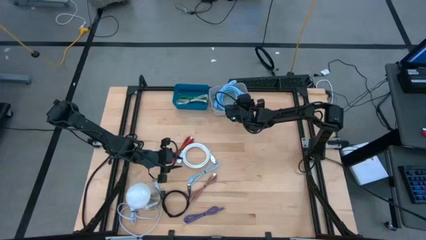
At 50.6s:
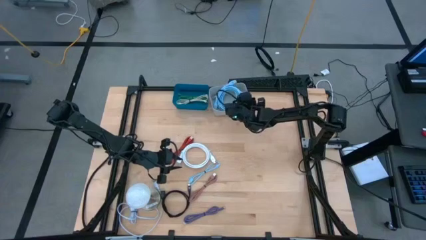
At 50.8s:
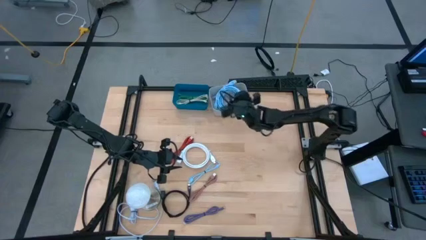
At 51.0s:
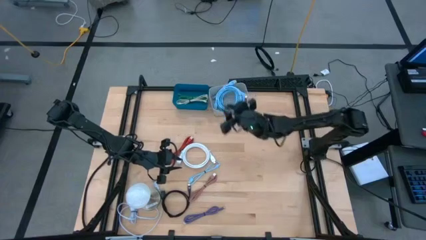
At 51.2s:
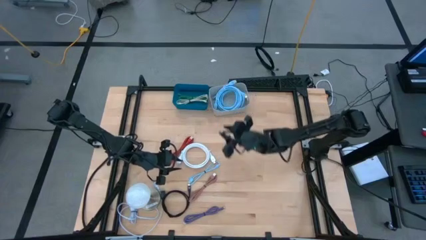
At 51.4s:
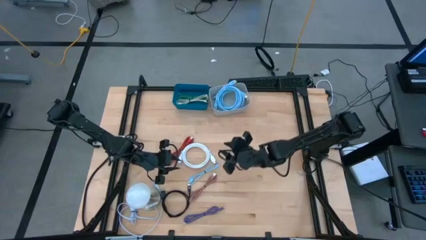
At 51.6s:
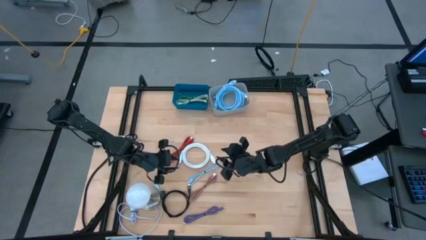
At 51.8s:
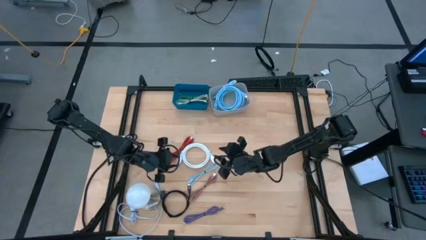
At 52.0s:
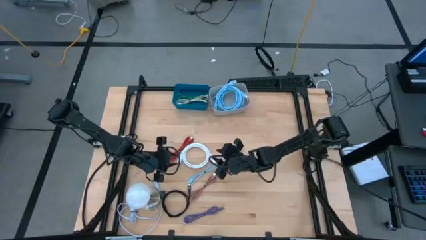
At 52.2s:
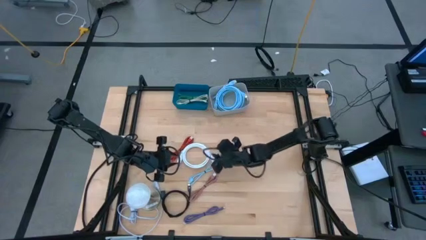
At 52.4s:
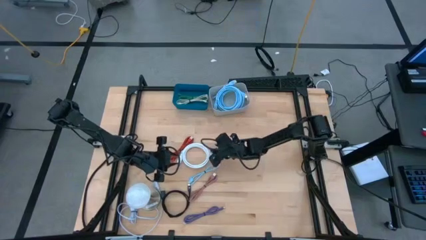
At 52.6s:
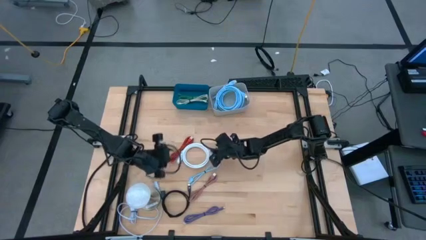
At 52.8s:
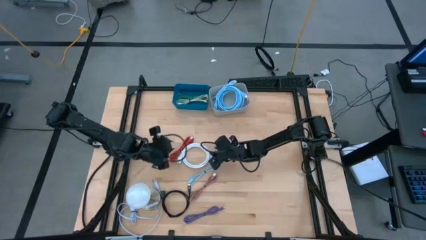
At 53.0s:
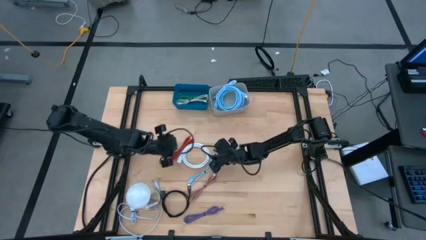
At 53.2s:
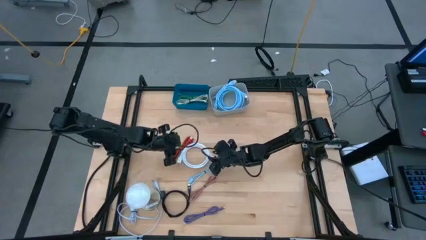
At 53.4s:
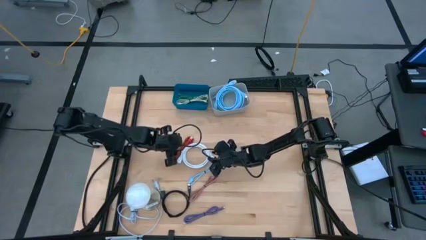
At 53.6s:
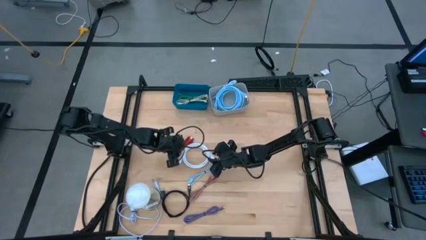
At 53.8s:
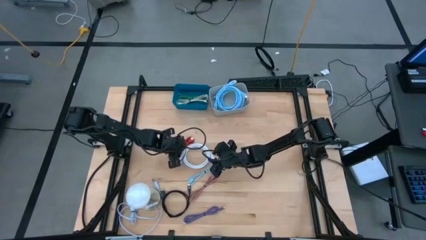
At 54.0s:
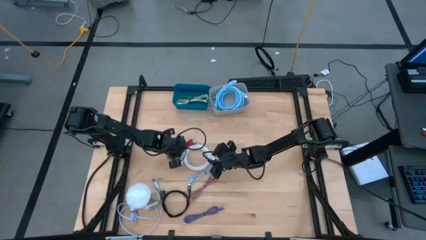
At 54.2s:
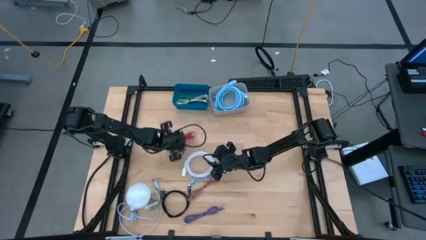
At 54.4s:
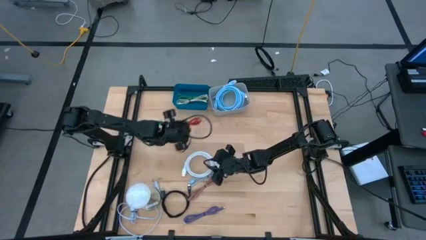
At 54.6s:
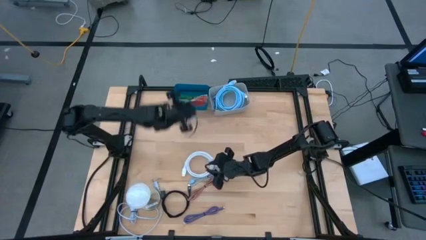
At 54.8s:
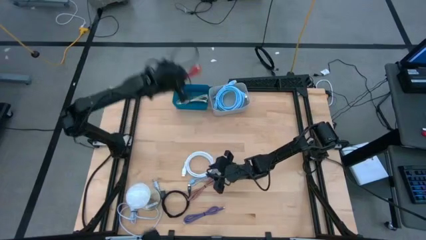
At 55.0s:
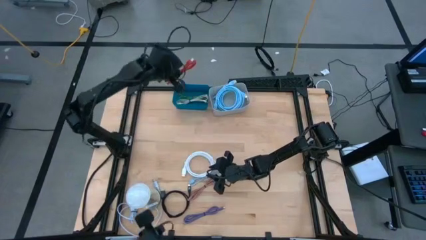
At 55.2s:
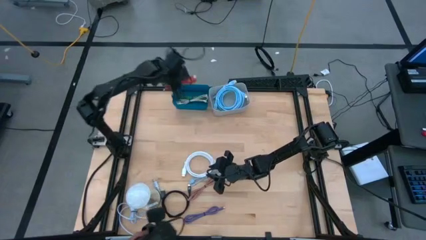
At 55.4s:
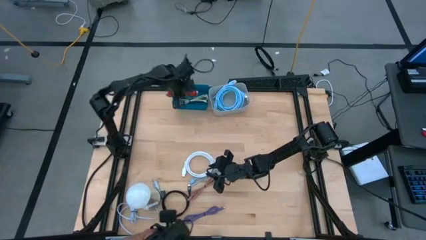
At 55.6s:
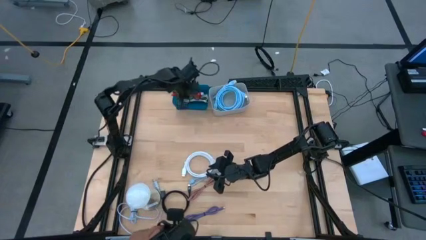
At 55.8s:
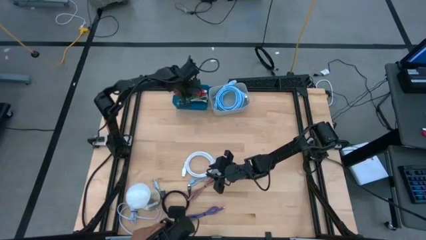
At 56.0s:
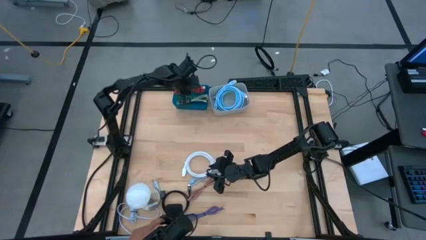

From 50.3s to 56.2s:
Task: Pick & Place USB Port
Put the red usb cable into the blue bin

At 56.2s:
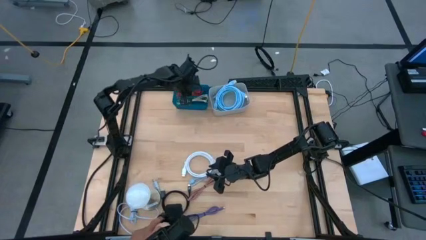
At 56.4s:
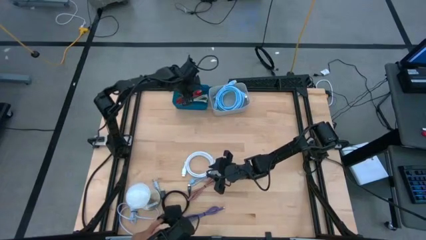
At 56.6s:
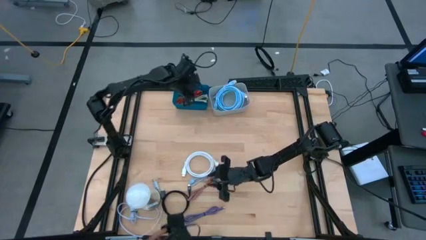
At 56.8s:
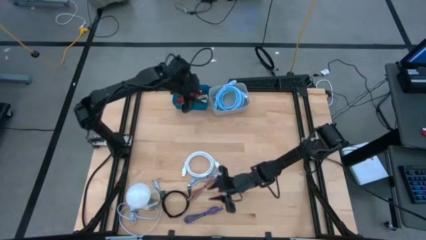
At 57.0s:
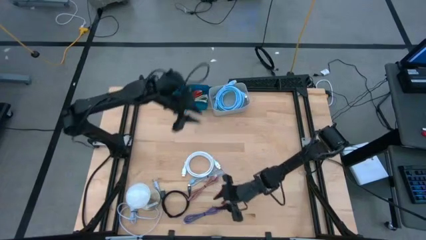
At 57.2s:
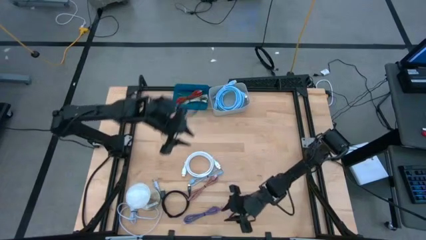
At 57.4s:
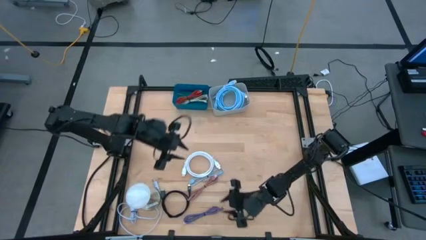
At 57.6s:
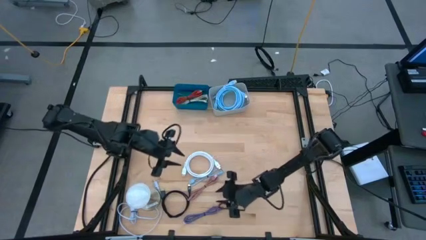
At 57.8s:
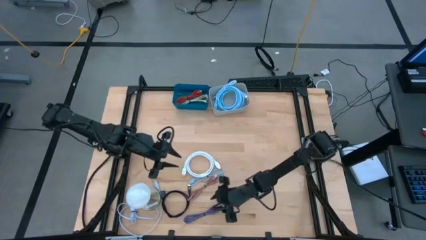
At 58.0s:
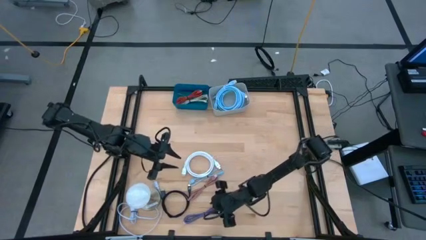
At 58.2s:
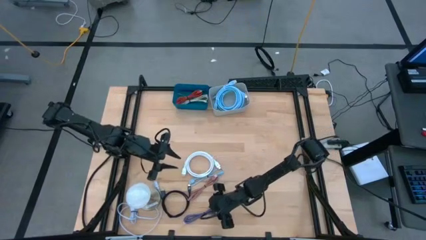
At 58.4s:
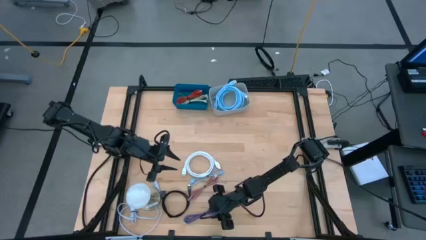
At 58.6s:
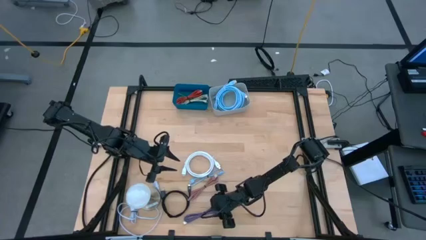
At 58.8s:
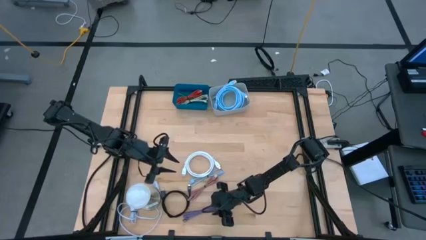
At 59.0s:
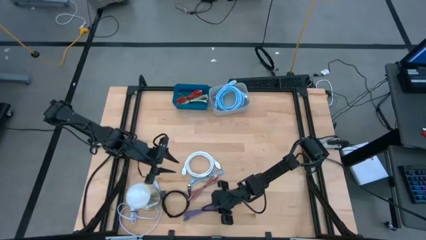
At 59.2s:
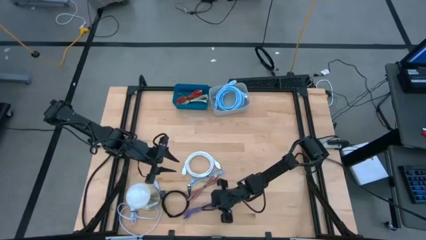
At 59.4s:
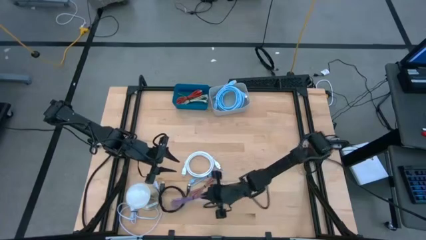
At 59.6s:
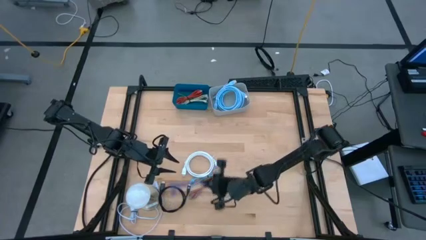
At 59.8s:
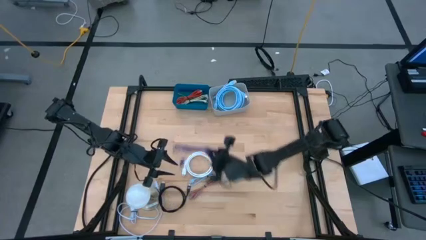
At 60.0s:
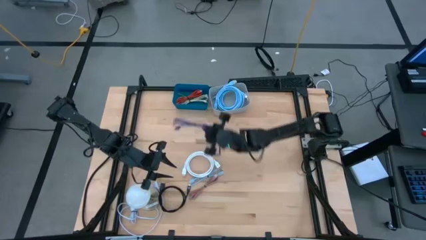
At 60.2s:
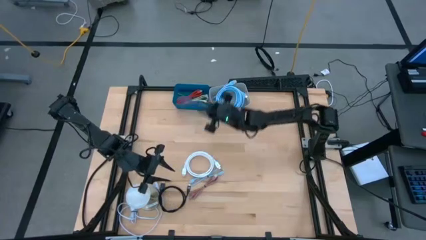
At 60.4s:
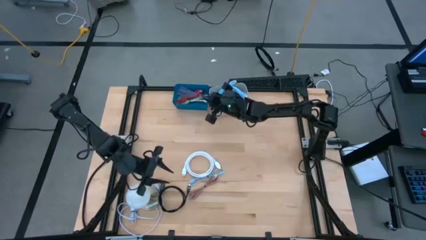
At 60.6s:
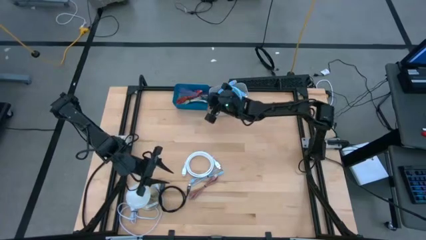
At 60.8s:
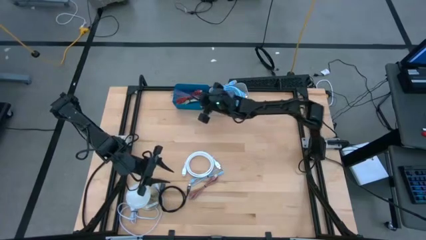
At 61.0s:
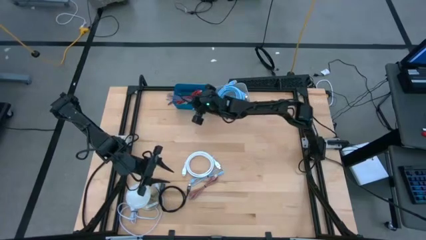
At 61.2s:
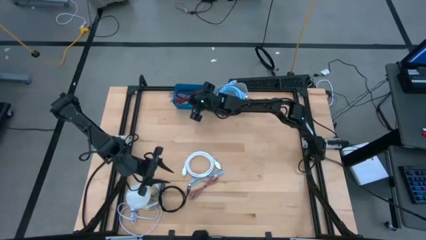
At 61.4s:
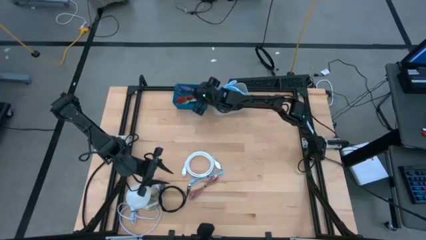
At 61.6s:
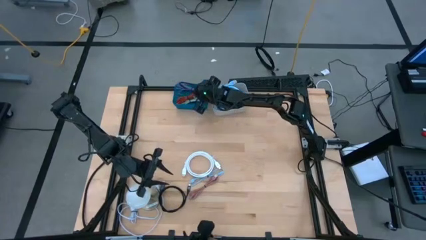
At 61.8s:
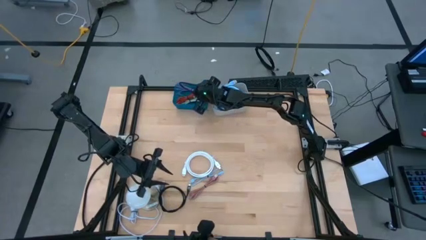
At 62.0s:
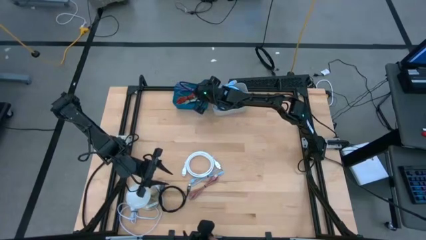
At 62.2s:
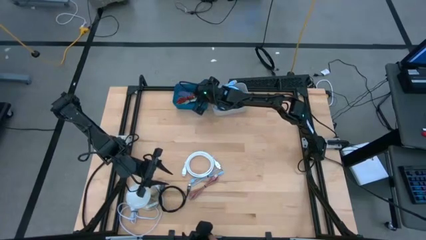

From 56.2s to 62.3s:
Put the purple usb cable into the blue bin

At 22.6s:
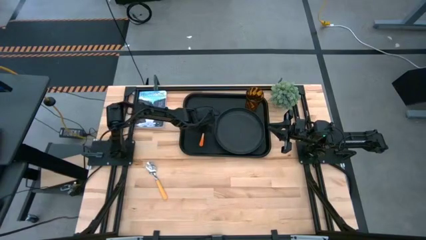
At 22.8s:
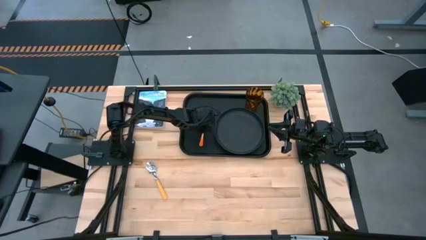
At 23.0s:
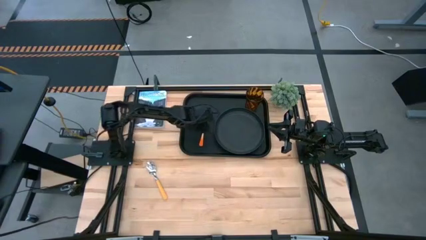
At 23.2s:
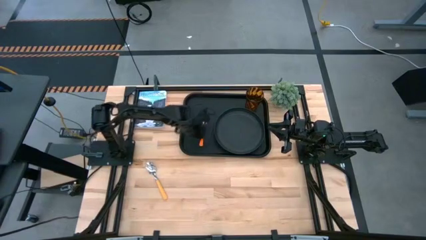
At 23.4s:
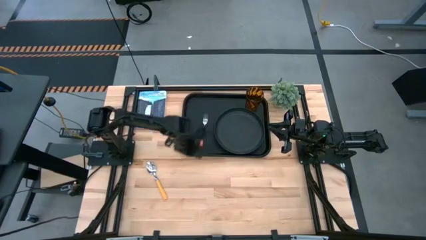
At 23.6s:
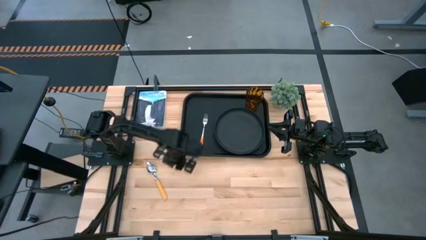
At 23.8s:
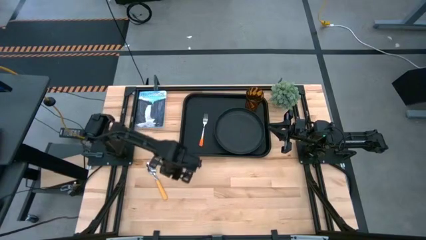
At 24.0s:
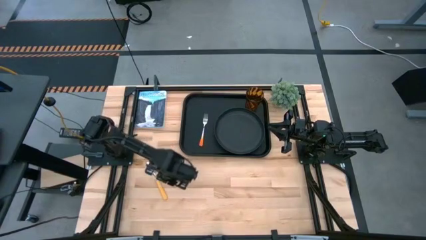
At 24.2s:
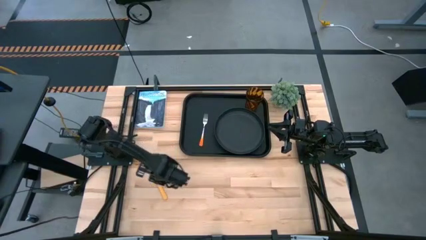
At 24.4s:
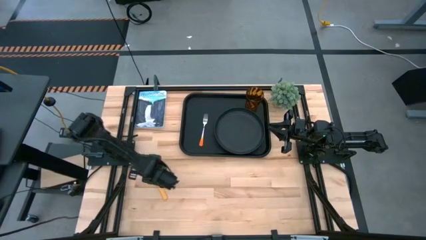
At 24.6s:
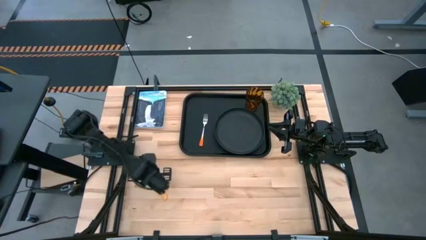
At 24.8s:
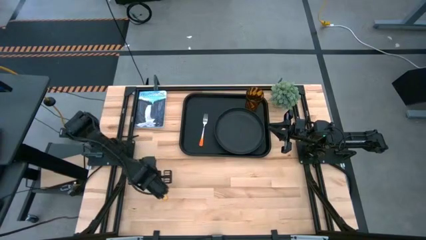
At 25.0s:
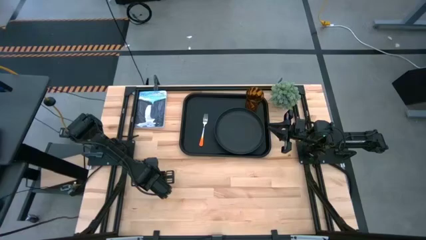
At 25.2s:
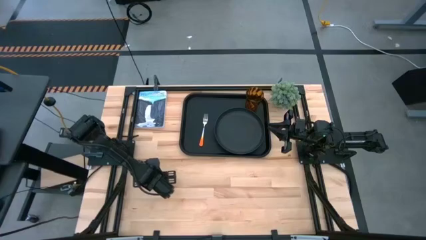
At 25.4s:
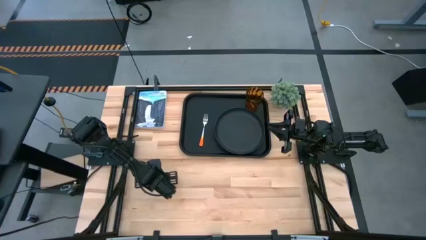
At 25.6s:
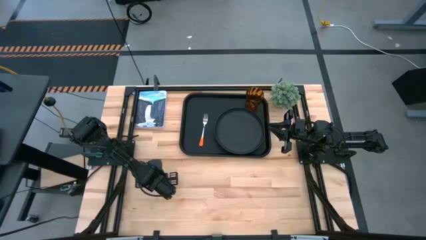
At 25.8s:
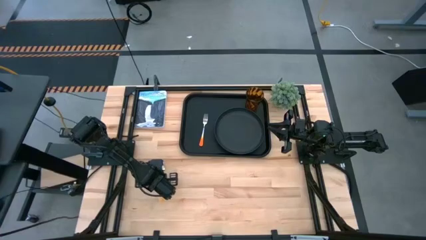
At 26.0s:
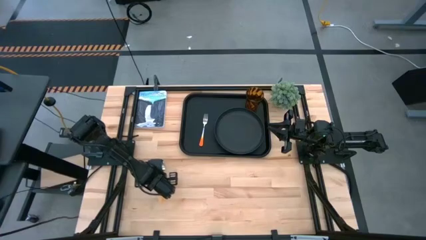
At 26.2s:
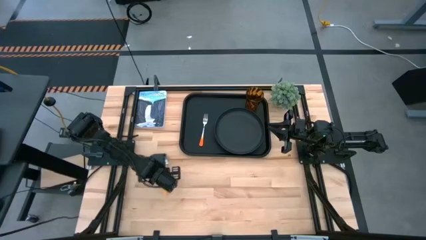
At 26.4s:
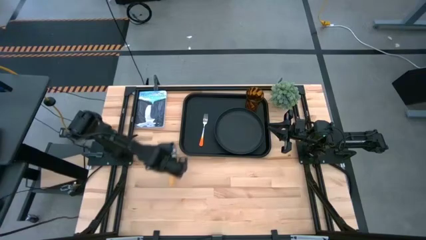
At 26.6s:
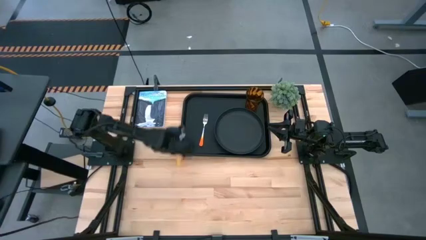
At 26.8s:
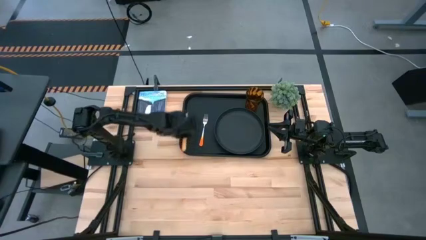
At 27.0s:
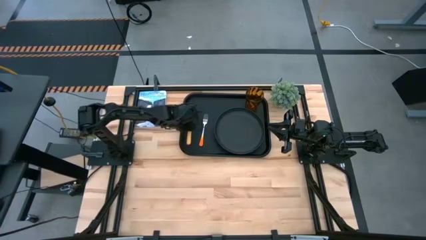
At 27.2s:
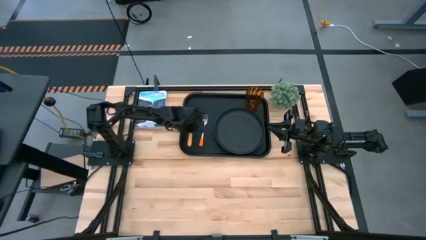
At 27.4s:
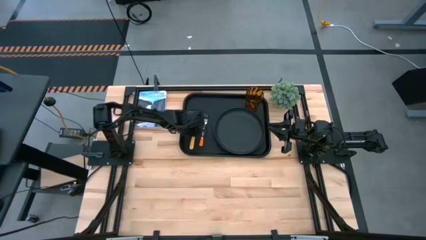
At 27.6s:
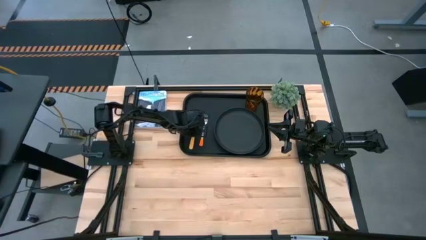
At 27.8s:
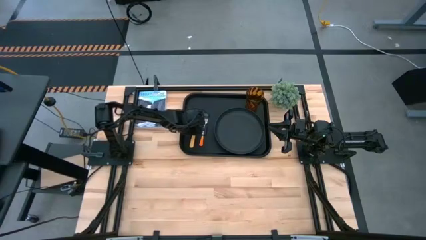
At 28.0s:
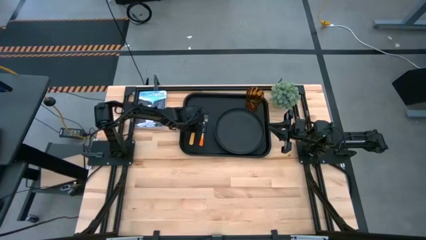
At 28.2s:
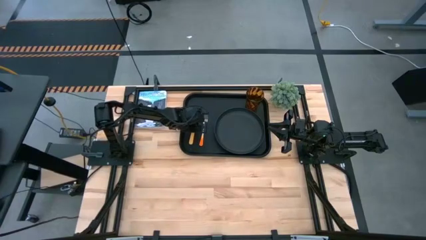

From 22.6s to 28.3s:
Task: Pick and place plate/cup/fork/spoon on tray
Put the yellow spoon beside the orange fork on the black food tray
